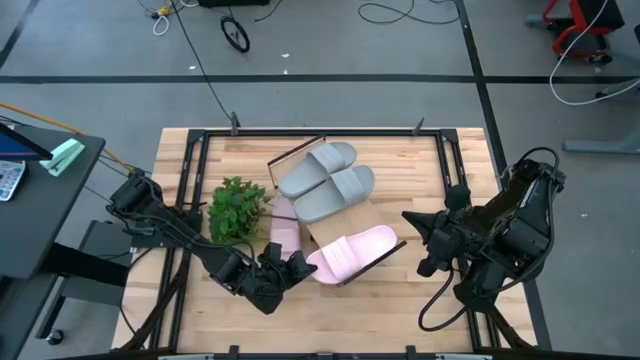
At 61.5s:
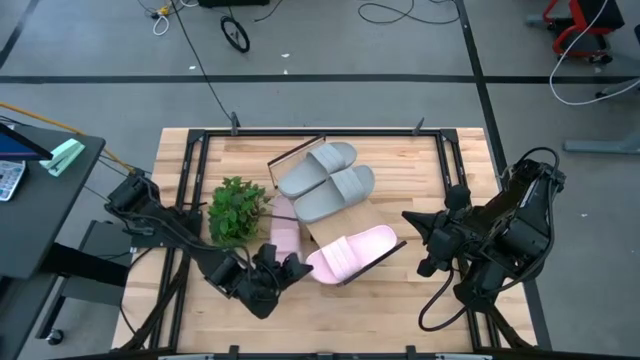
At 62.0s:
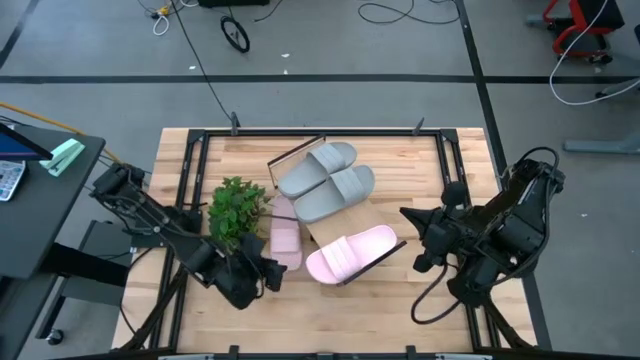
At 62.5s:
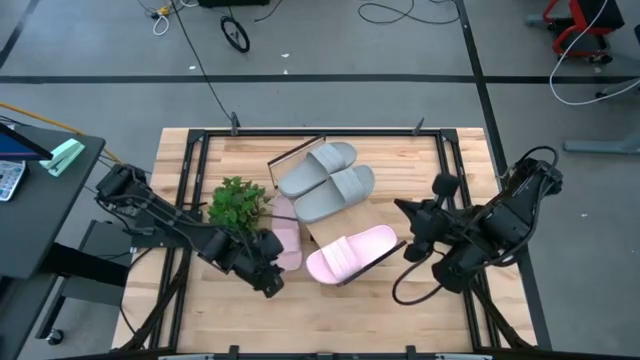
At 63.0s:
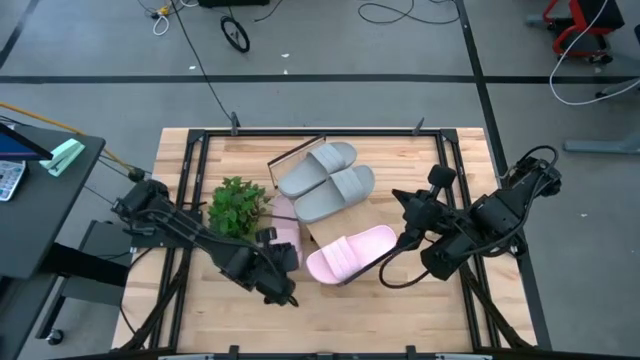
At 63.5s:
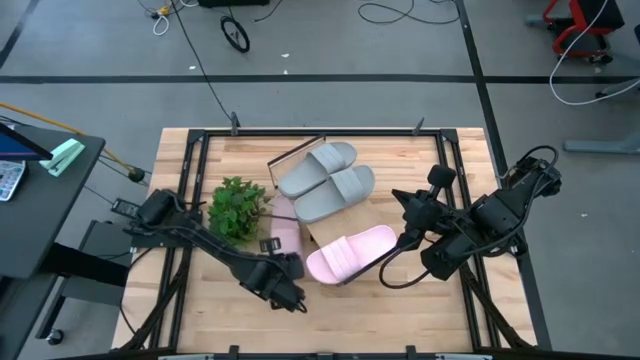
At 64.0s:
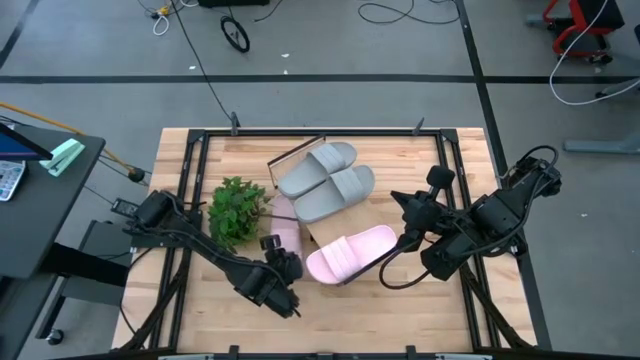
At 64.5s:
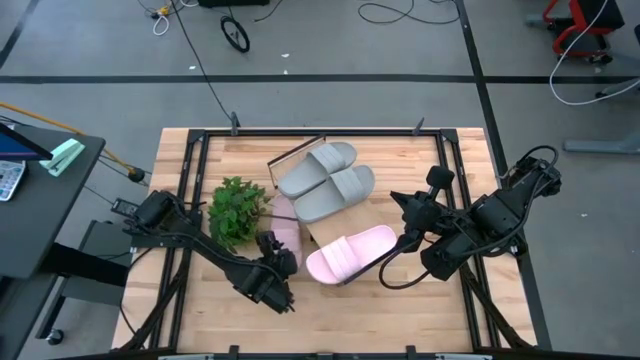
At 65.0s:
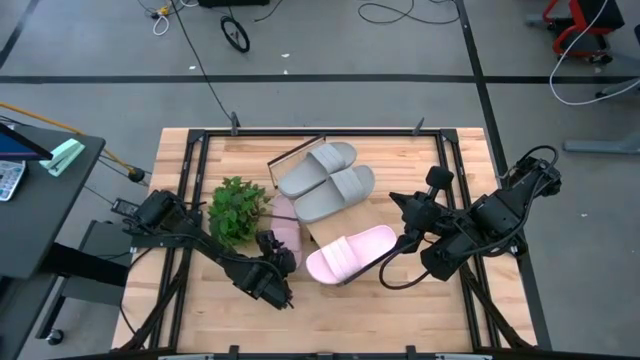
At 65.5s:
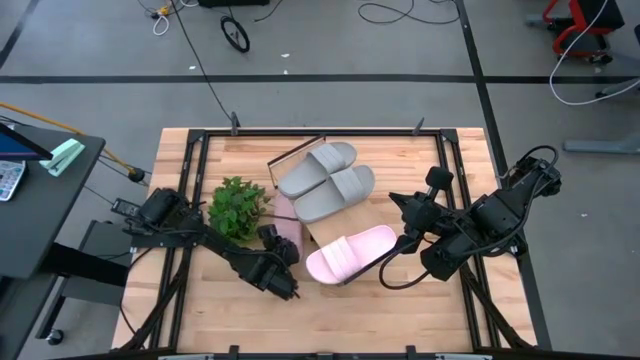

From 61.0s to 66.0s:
Task: Pick and place slides into the shelf
Put the pink slide on the shelf

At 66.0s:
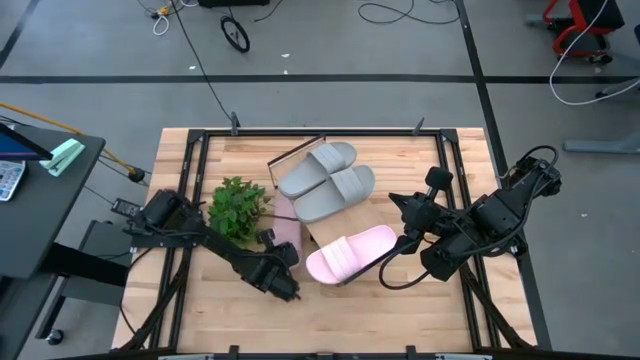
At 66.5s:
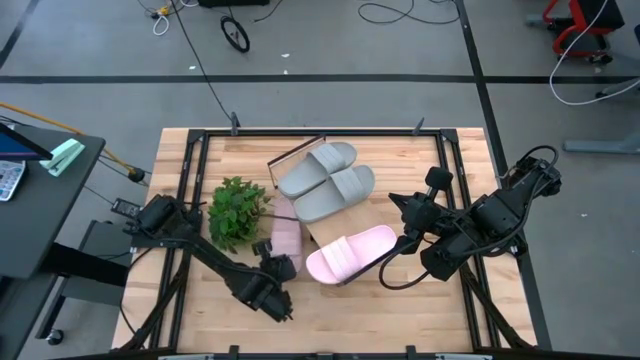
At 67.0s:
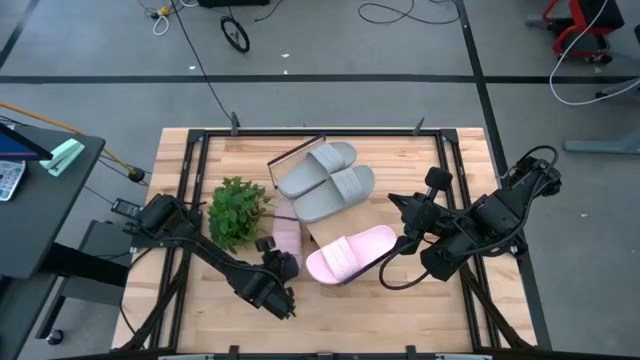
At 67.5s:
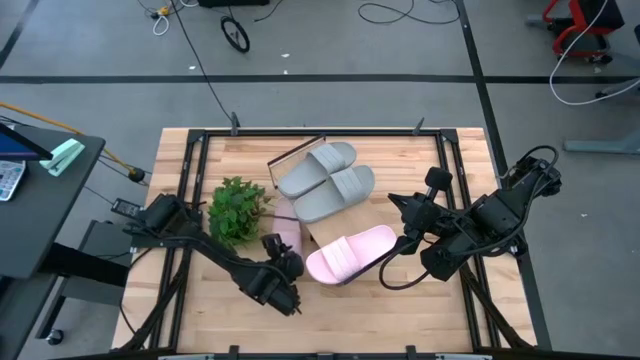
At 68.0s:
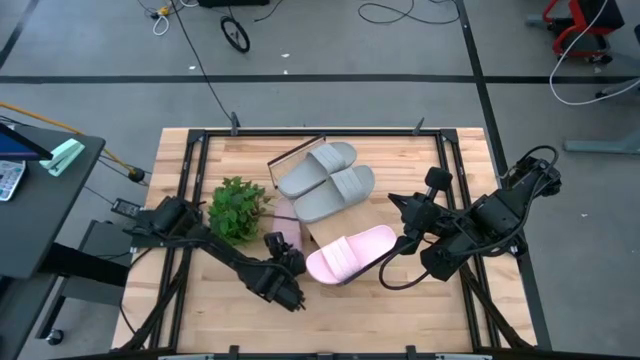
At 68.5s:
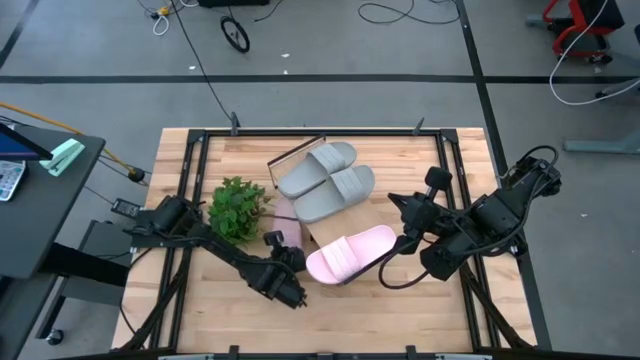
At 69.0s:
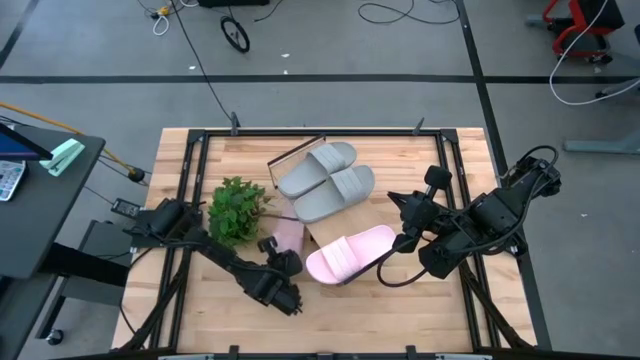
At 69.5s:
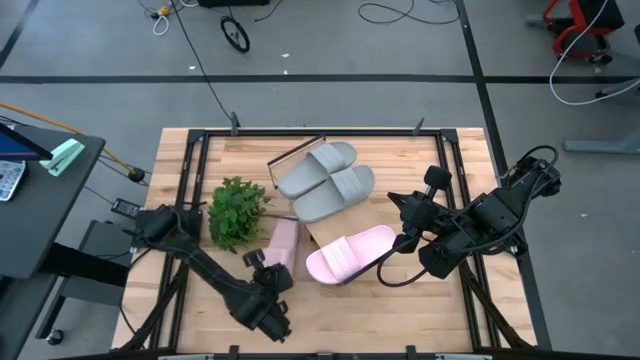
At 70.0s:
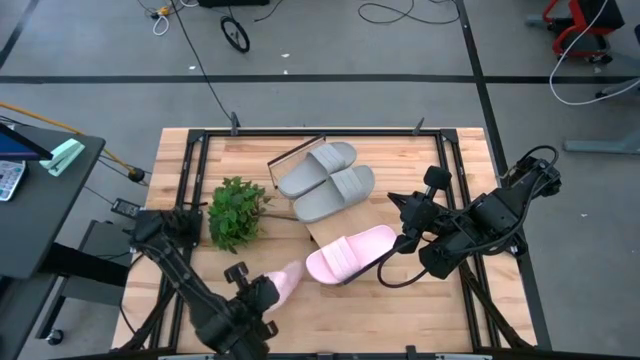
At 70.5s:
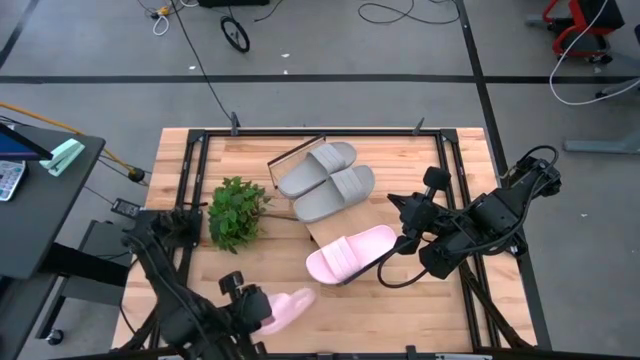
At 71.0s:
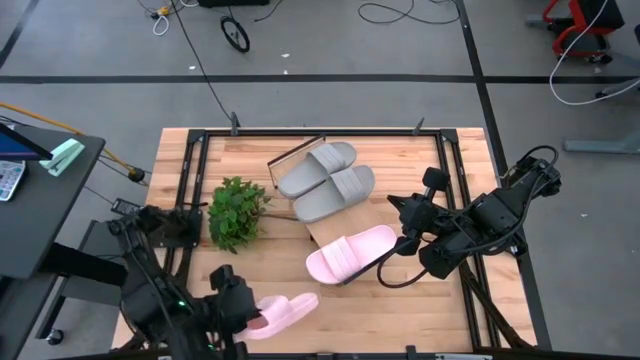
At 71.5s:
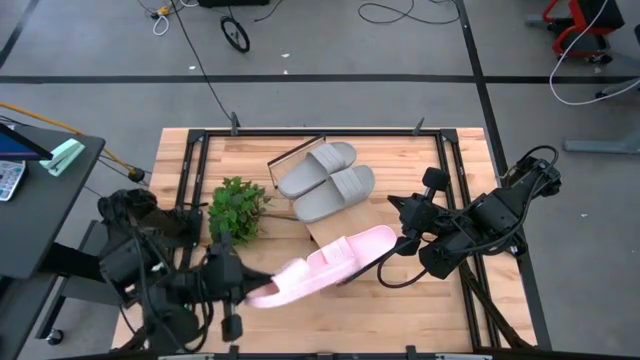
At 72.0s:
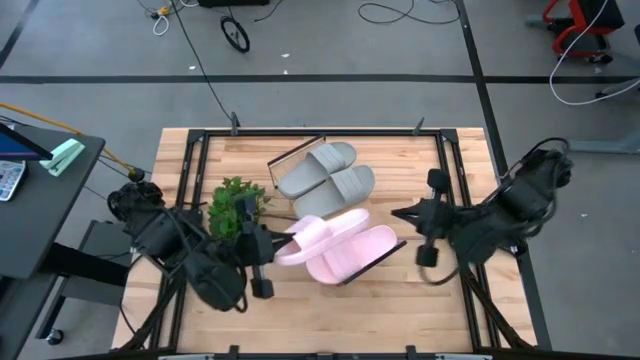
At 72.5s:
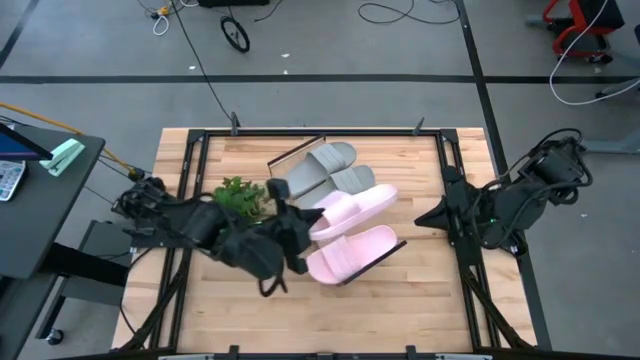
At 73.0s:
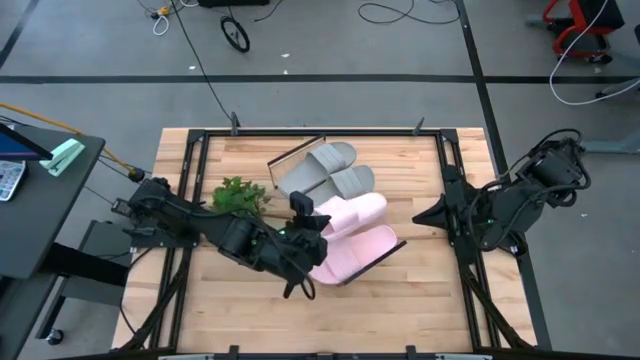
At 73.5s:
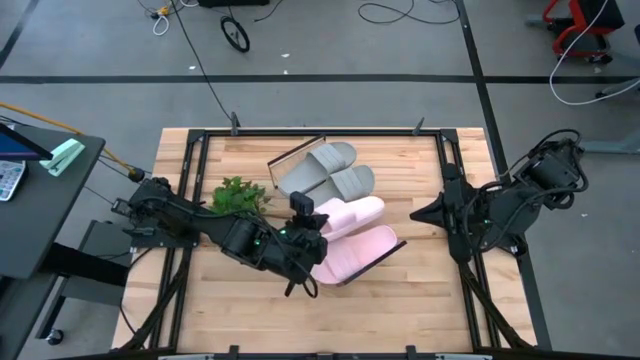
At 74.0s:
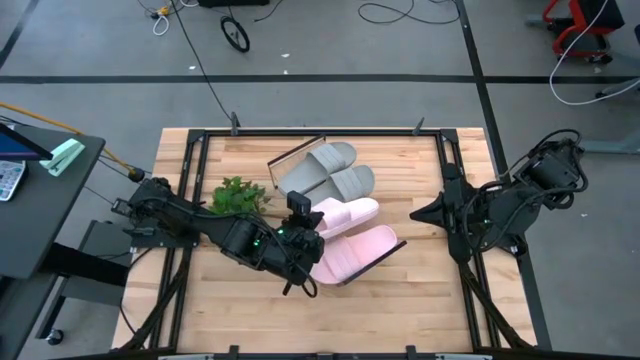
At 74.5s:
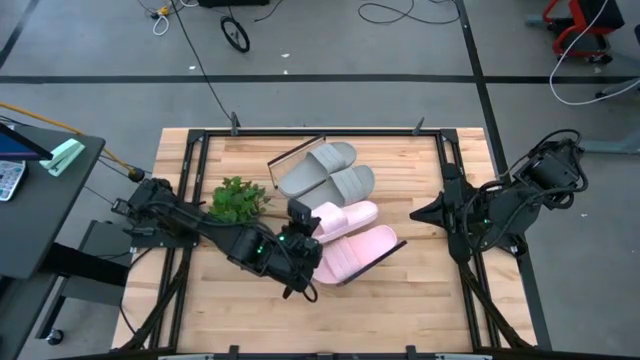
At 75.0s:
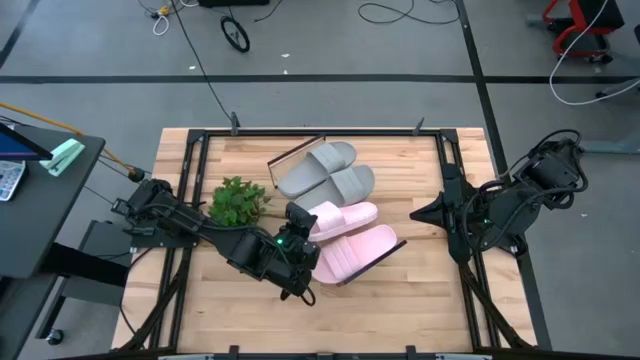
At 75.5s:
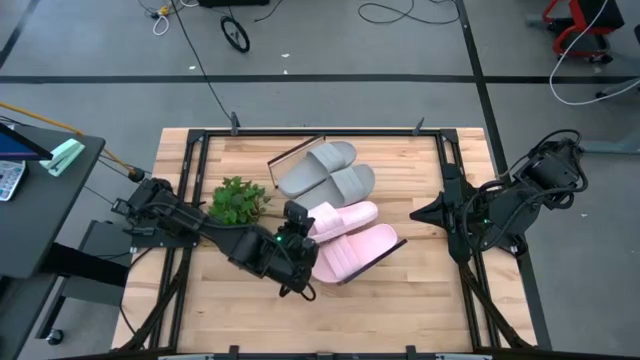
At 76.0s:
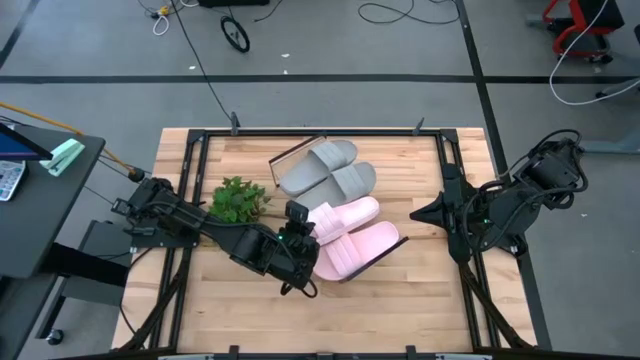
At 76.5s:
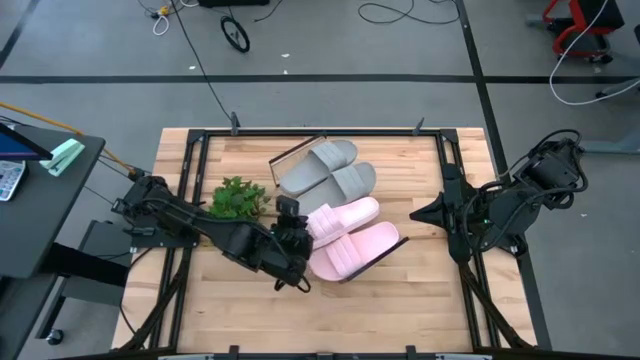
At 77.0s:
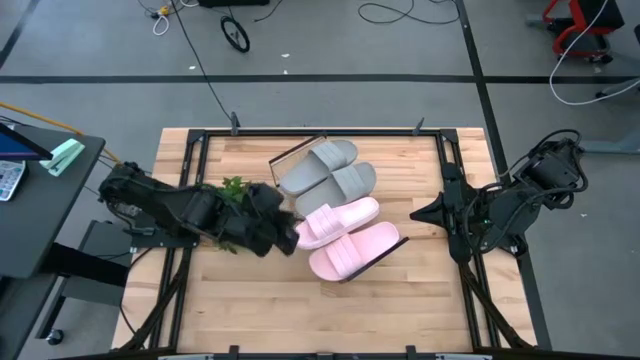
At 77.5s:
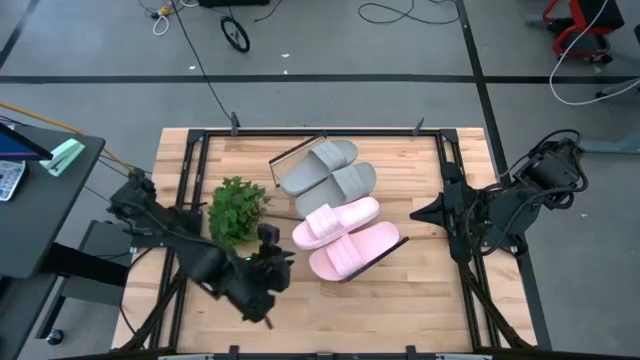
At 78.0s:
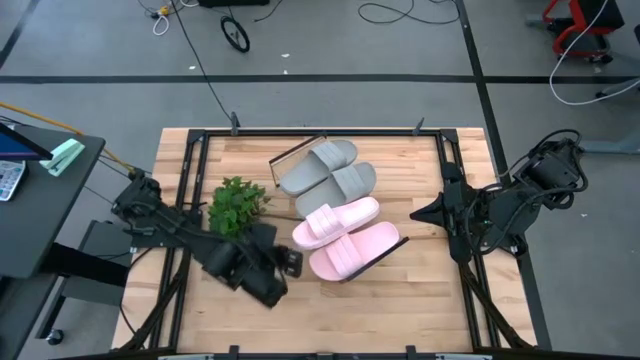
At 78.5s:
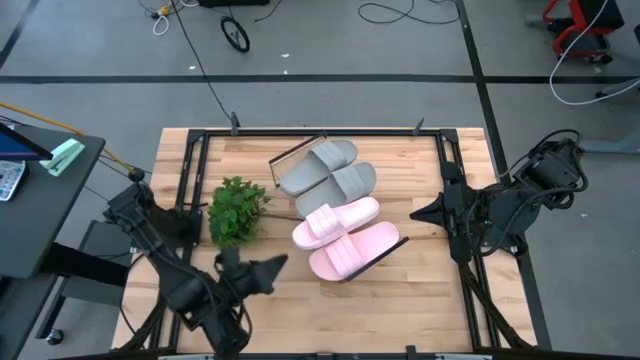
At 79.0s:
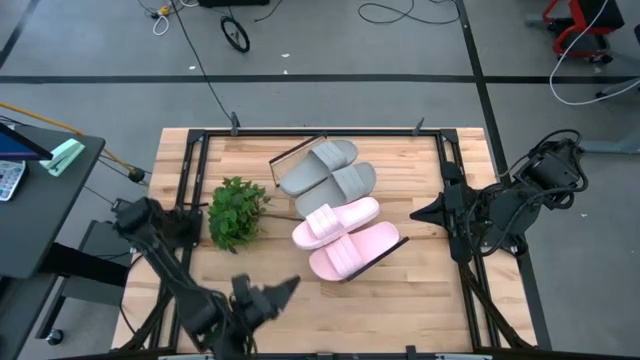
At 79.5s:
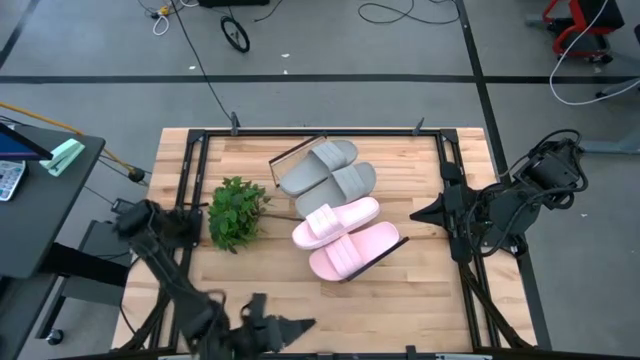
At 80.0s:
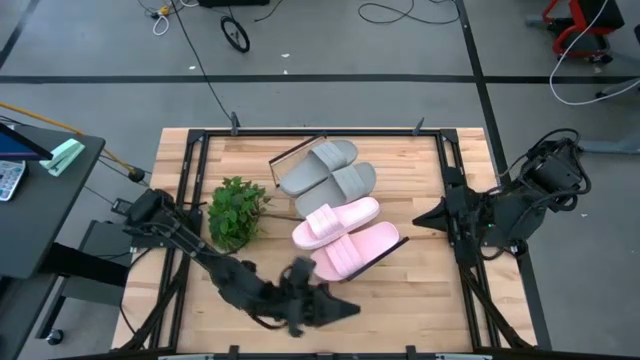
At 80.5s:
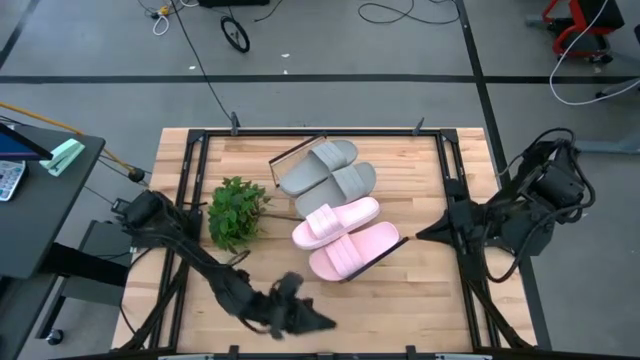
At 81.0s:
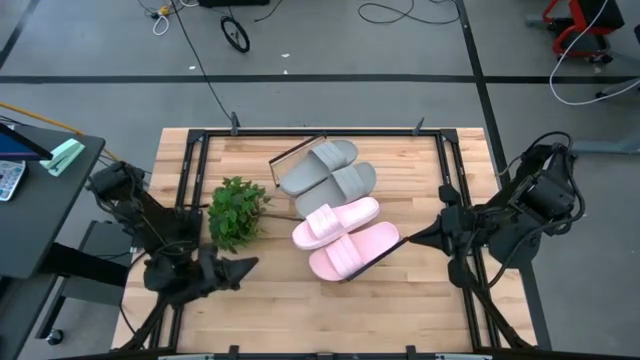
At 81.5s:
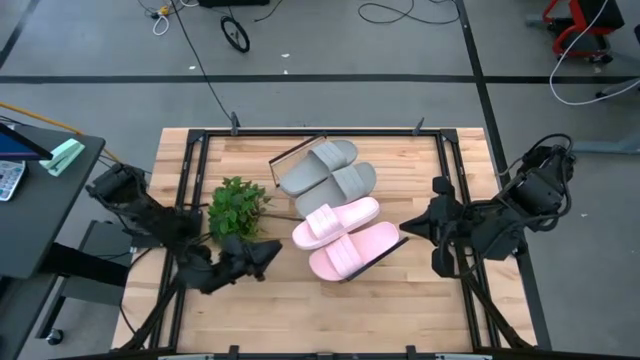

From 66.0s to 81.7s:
Put the pink slide on the shelf
